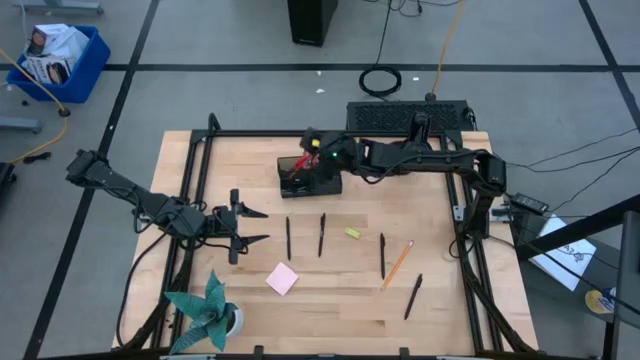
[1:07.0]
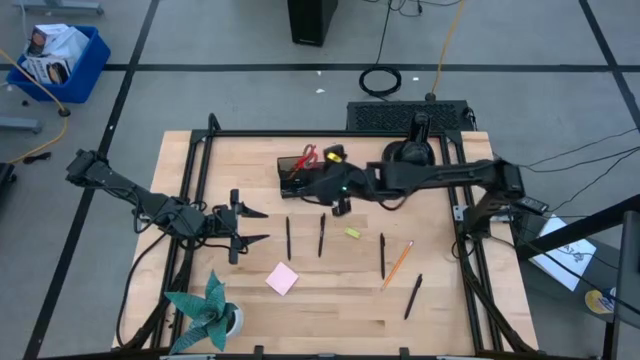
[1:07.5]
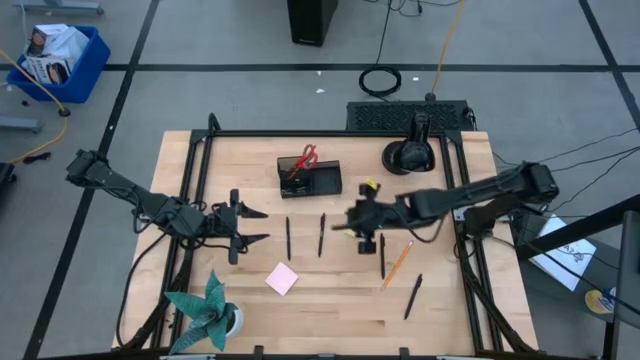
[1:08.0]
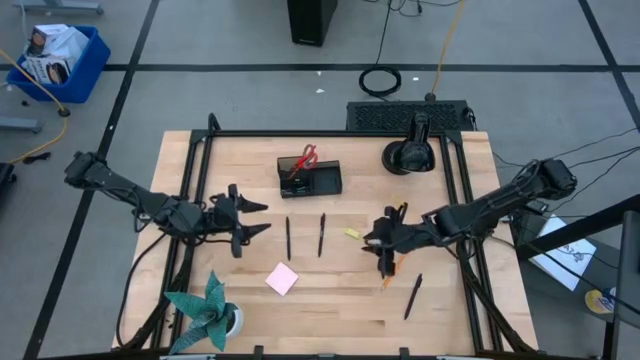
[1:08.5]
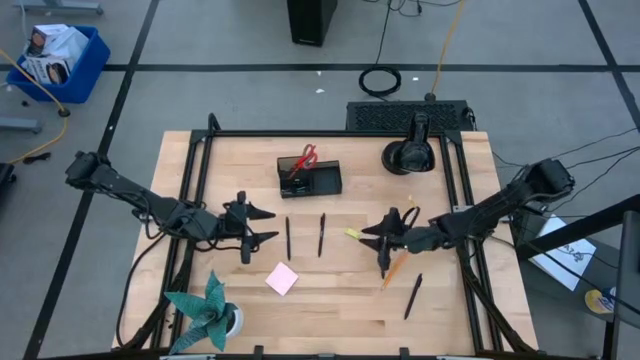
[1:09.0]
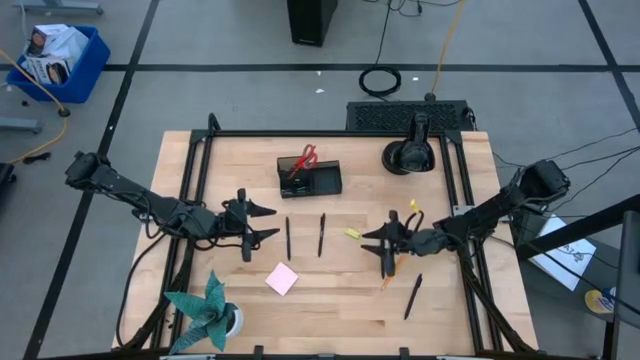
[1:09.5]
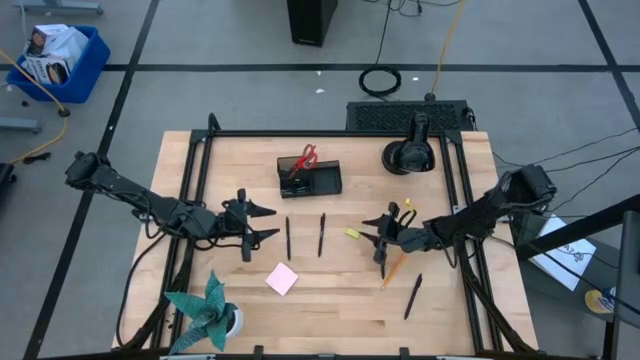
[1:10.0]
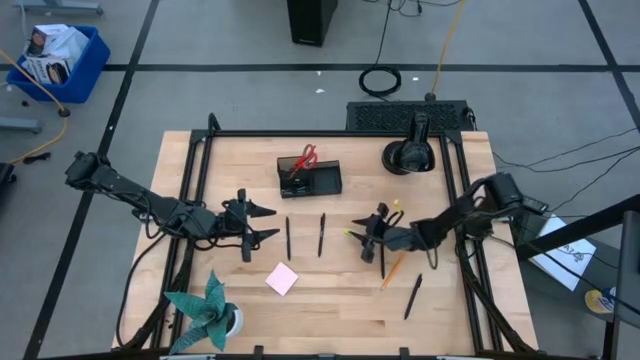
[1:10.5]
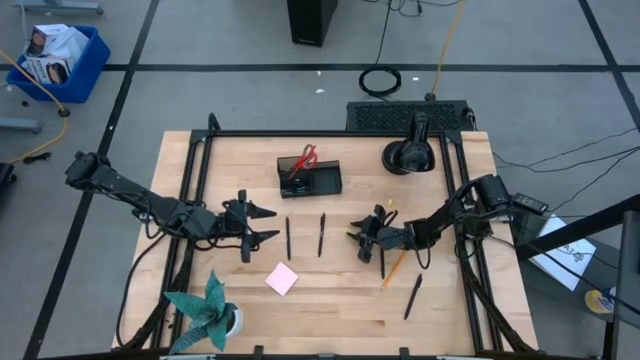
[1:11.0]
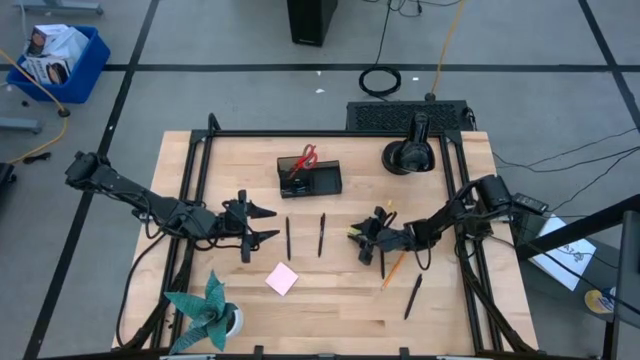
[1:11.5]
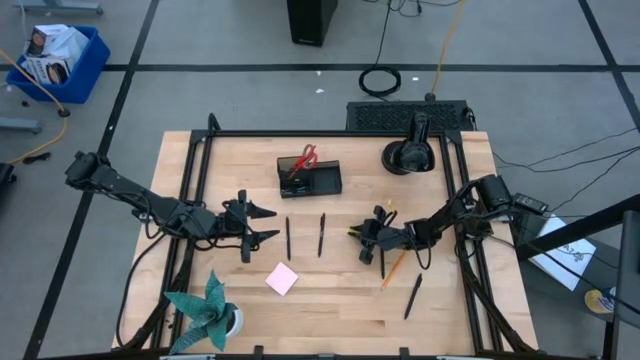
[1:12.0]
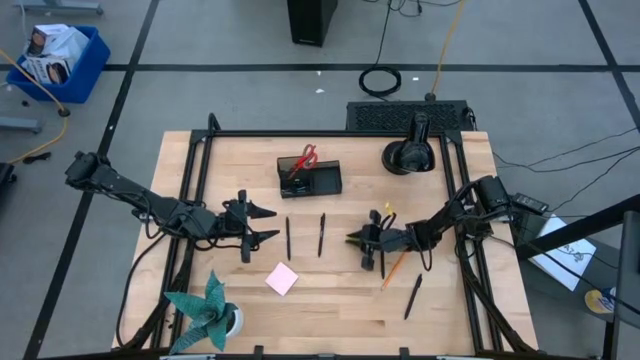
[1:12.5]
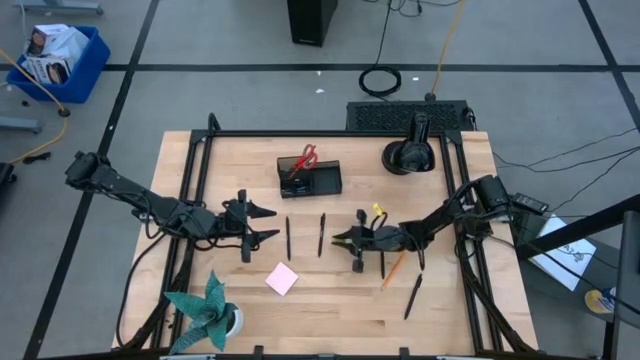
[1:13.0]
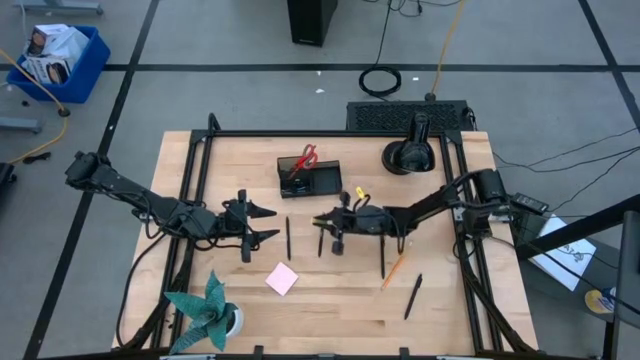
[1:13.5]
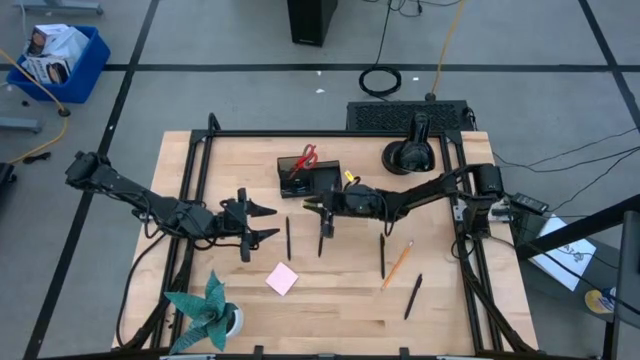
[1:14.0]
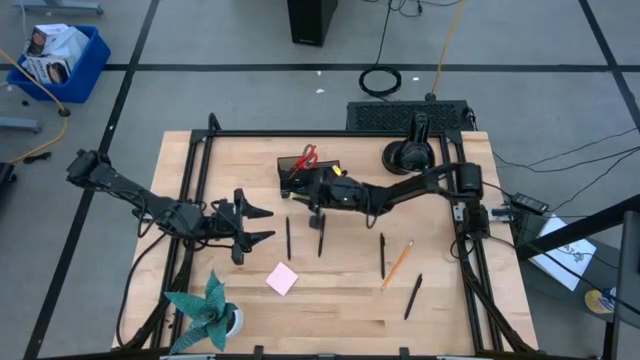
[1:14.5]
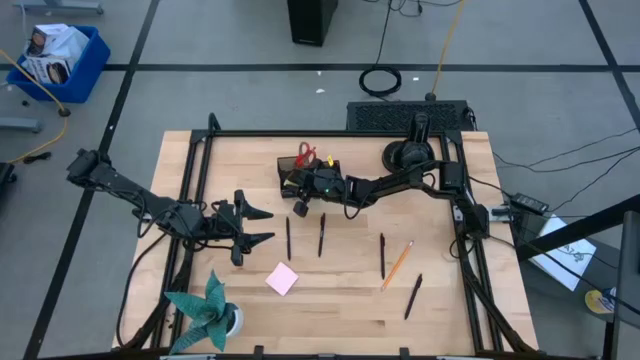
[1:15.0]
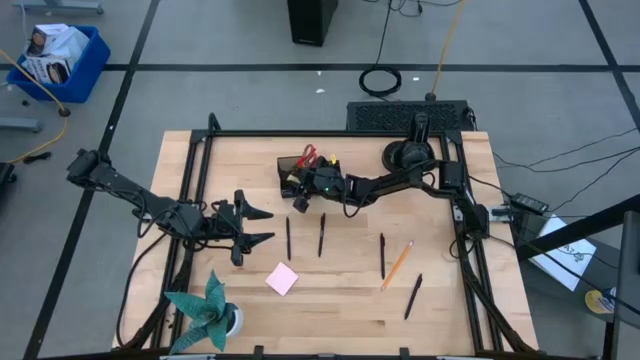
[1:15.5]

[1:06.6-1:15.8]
Task: Pick and place office supplies into organizer
Put the green eraser into the black desk organizer

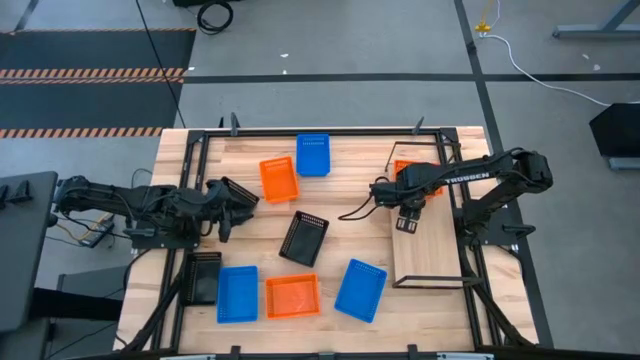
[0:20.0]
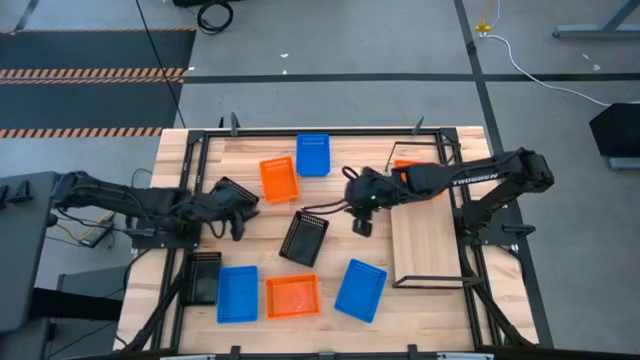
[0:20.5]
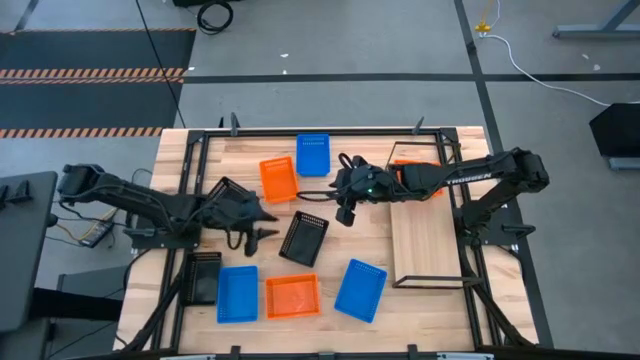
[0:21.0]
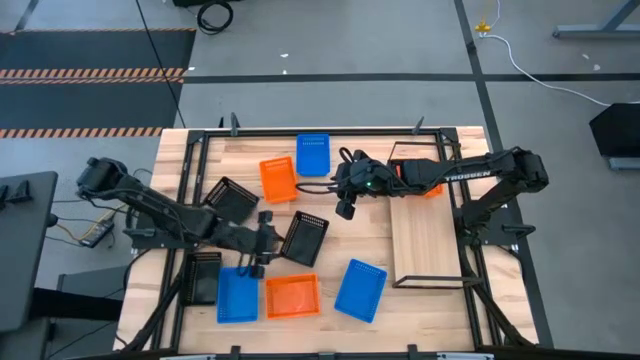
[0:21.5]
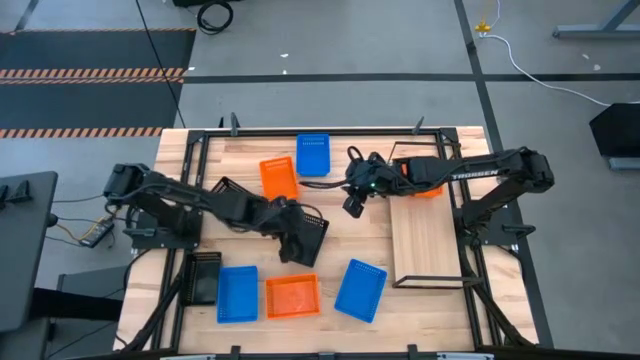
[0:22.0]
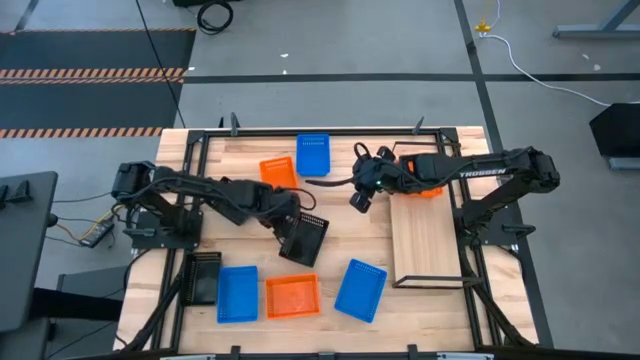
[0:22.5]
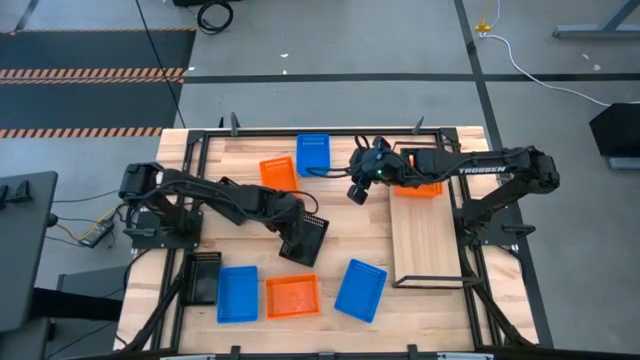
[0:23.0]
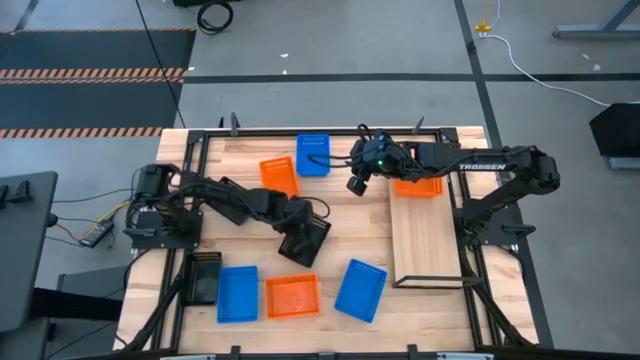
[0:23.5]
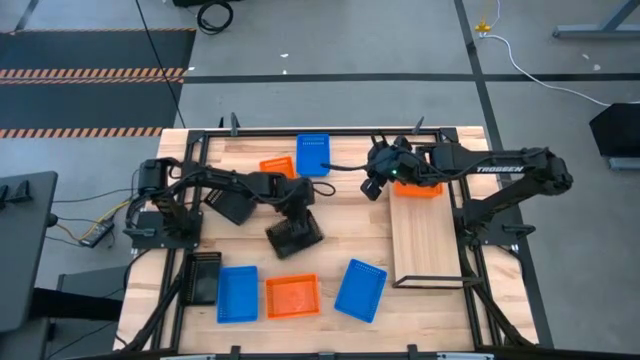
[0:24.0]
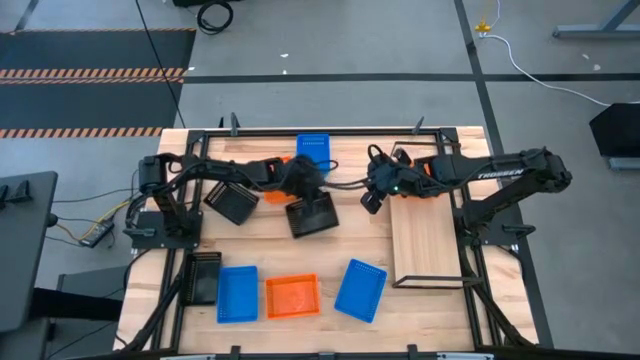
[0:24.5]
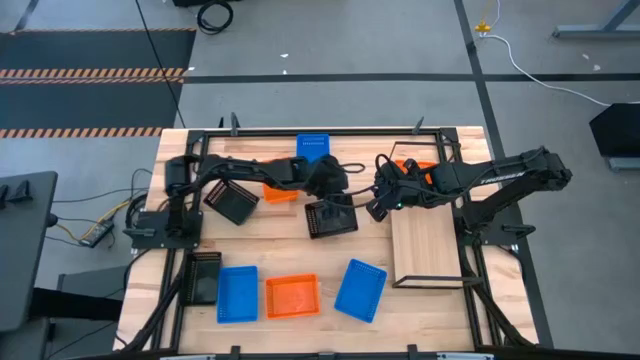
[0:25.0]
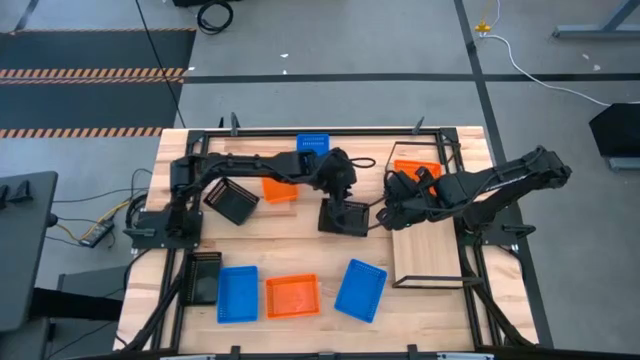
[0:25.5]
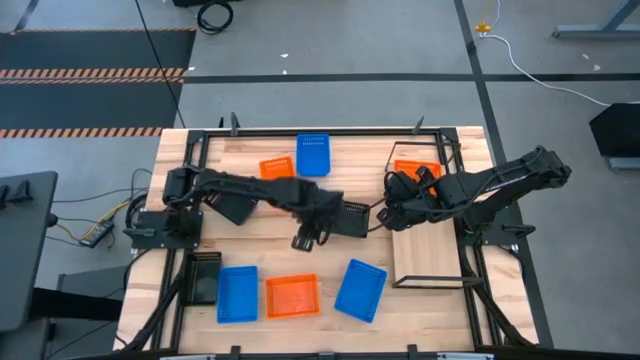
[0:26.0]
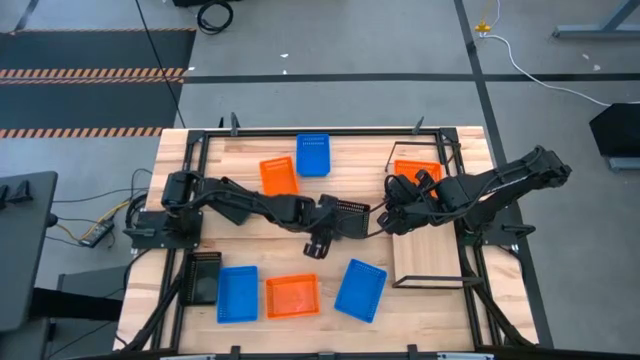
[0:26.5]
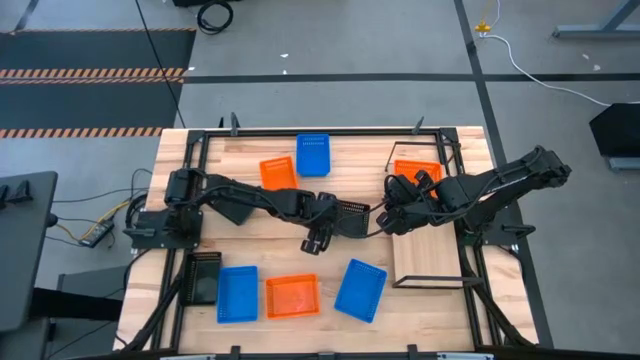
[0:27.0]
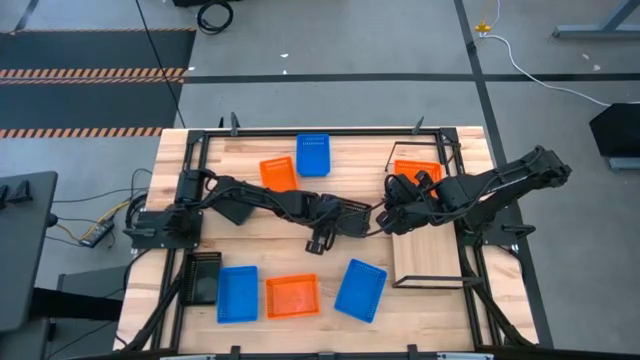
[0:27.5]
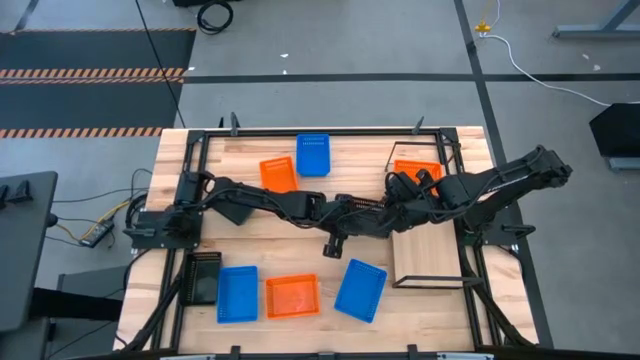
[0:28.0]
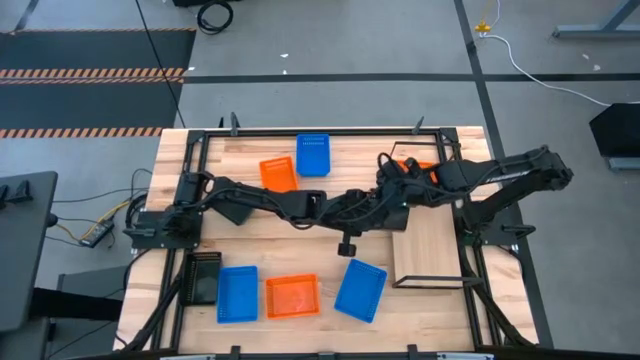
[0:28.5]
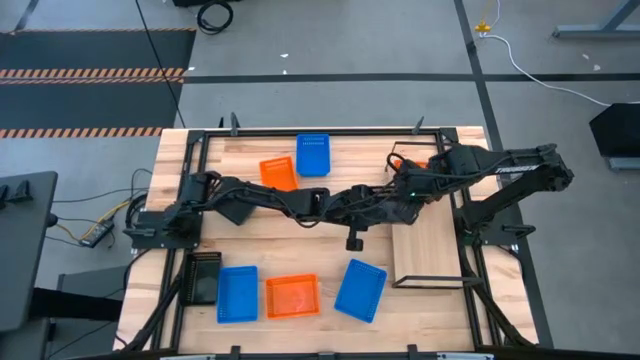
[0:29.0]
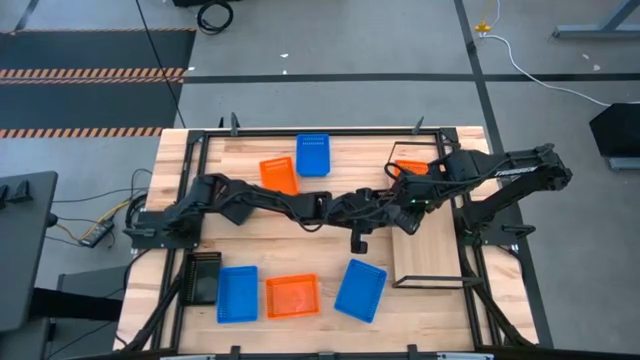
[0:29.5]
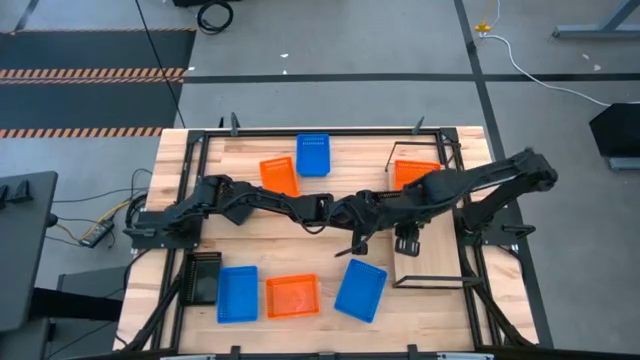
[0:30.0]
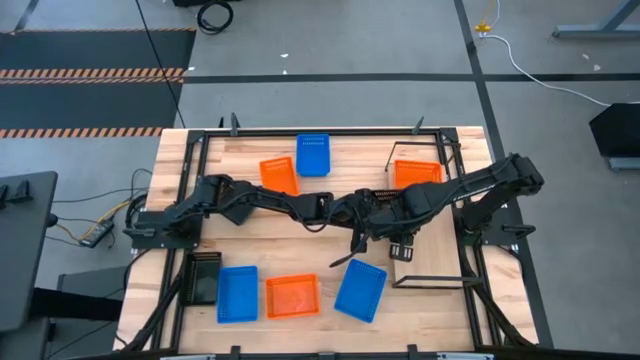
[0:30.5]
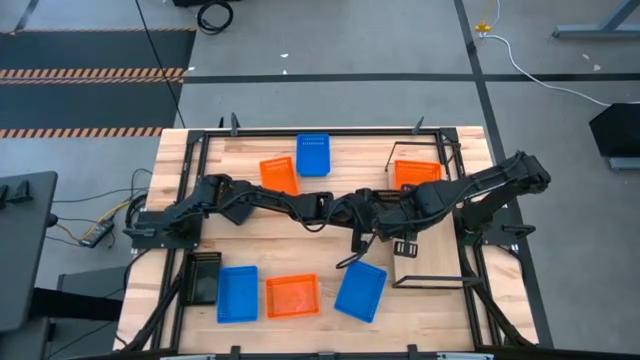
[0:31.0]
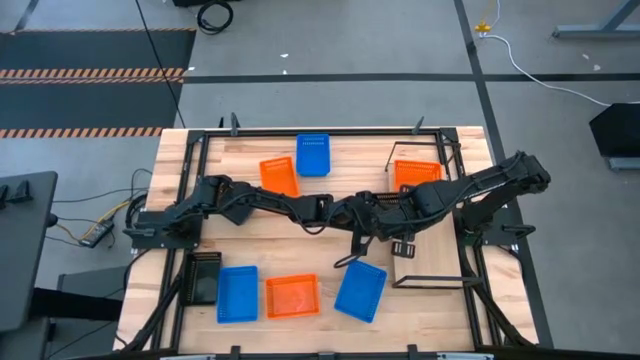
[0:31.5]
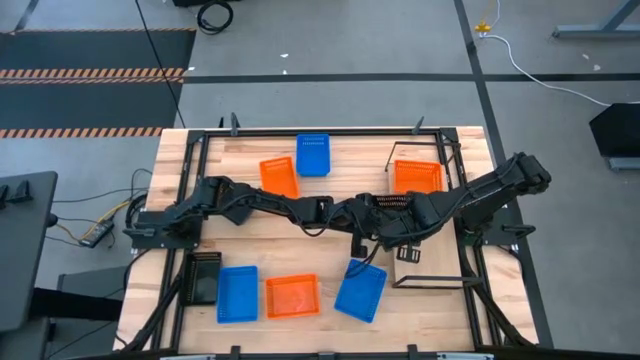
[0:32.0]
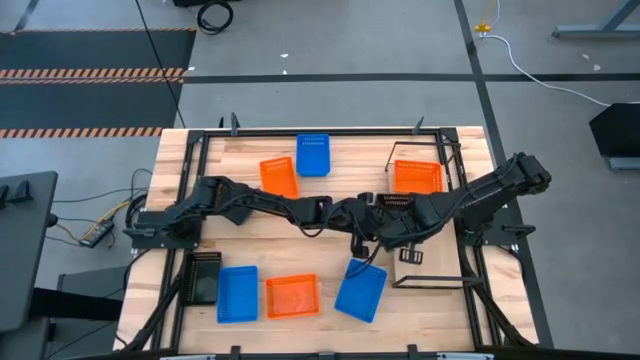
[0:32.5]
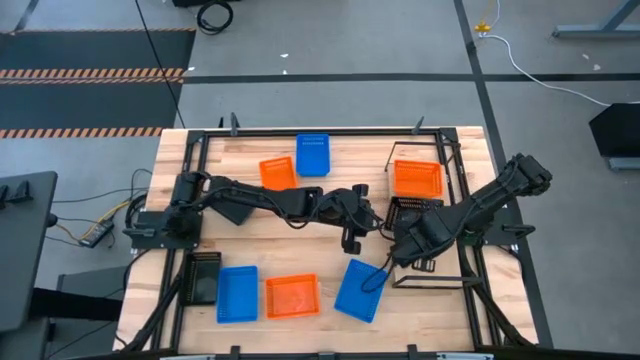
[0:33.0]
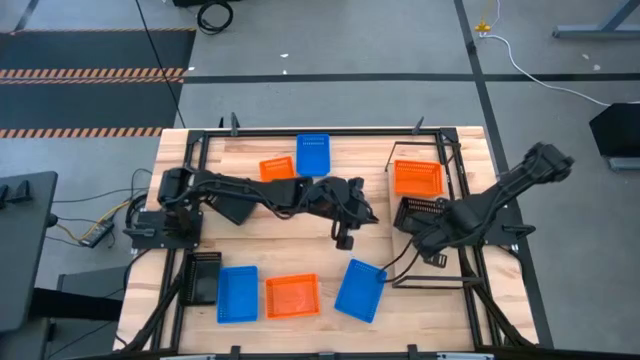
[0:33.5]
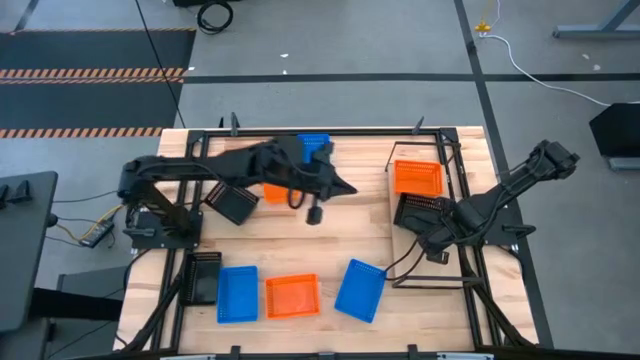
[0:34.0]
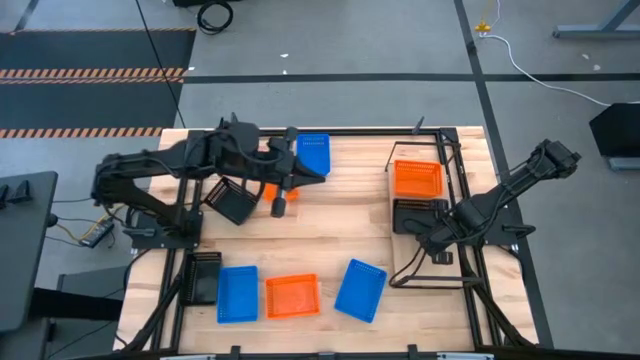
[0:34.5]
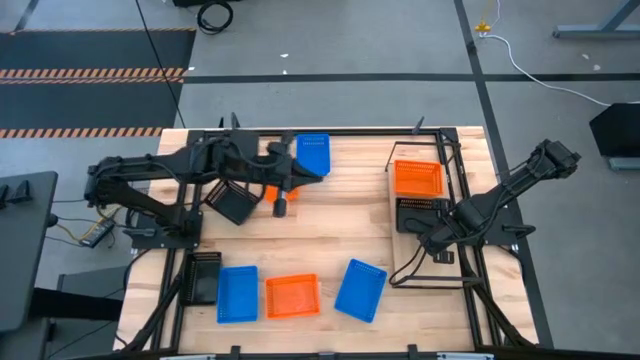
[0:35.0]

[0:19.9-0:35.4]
Task: Stack baskets on shelf by color
Put the right black bin on the shelf
